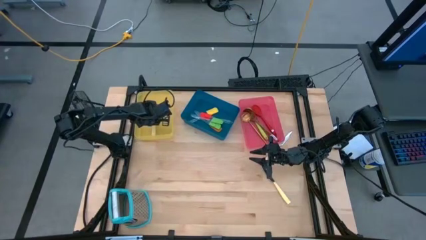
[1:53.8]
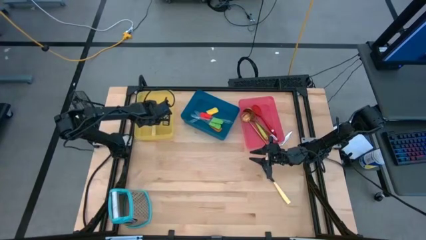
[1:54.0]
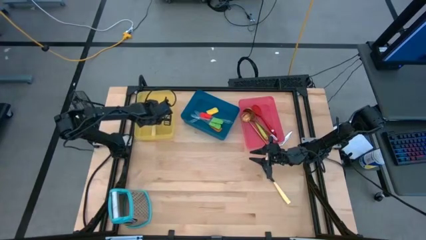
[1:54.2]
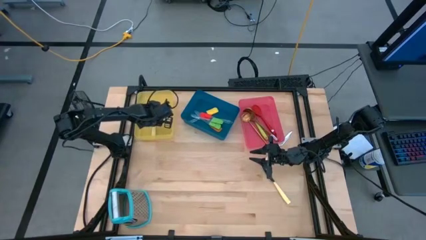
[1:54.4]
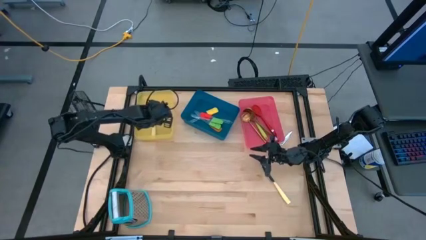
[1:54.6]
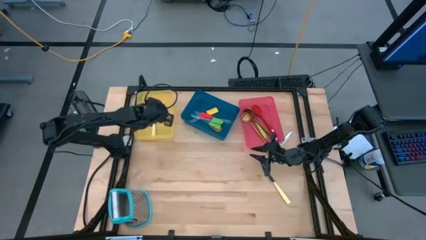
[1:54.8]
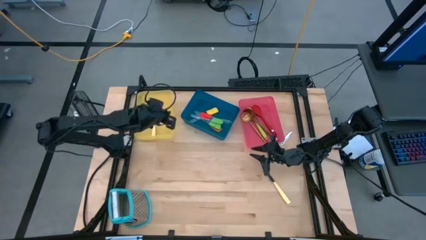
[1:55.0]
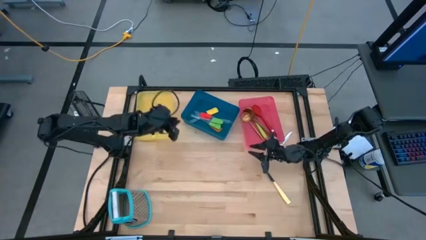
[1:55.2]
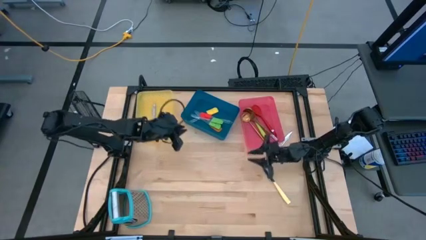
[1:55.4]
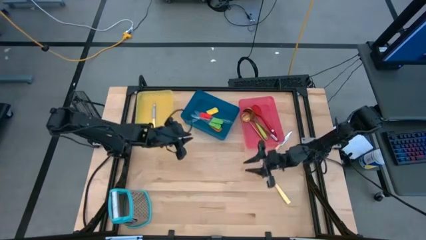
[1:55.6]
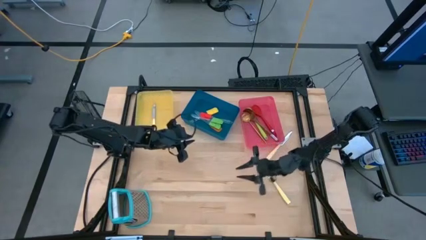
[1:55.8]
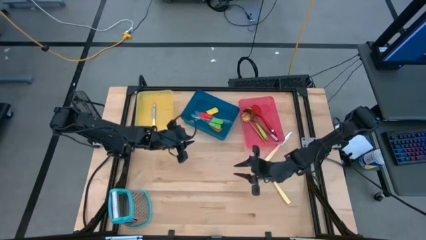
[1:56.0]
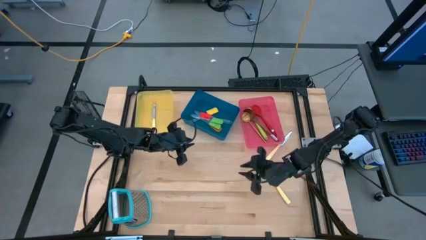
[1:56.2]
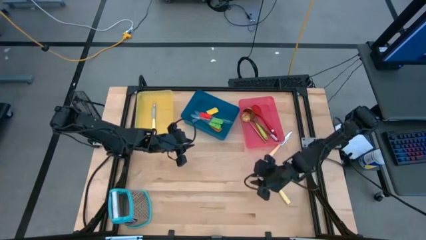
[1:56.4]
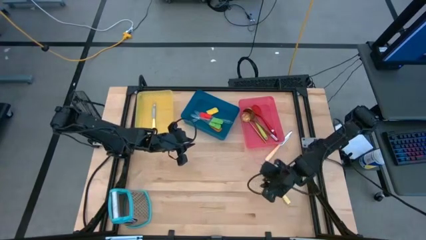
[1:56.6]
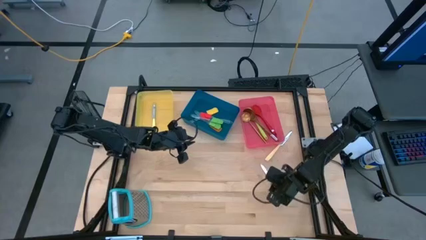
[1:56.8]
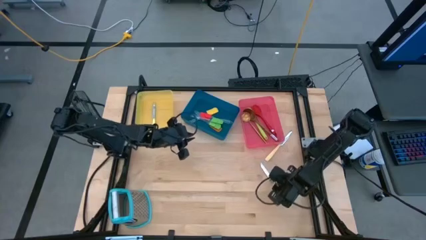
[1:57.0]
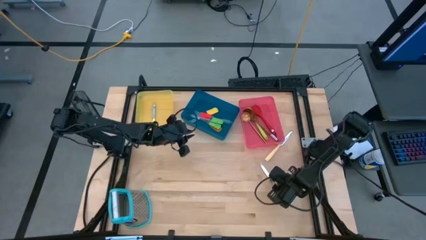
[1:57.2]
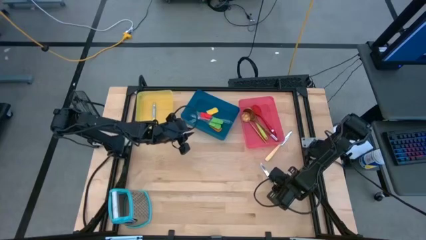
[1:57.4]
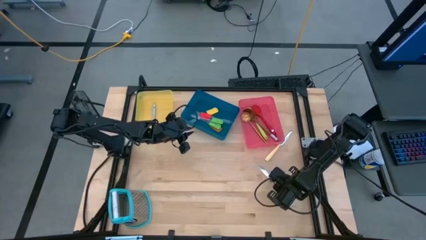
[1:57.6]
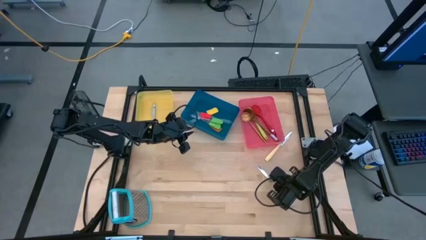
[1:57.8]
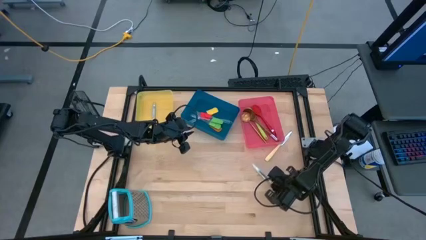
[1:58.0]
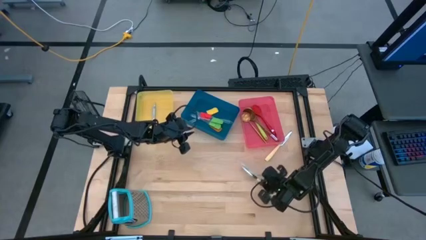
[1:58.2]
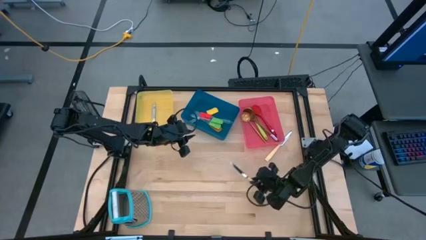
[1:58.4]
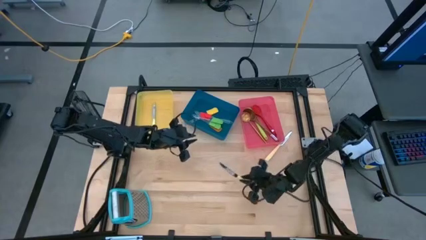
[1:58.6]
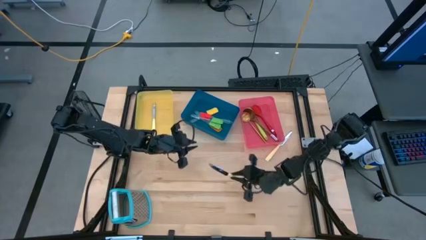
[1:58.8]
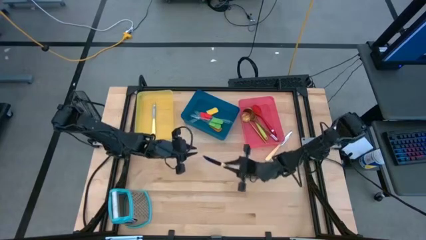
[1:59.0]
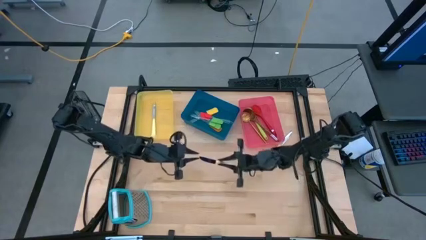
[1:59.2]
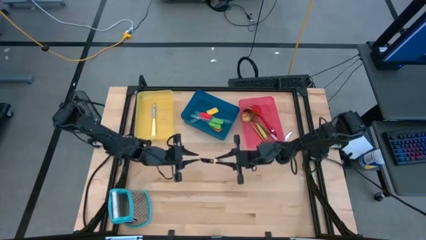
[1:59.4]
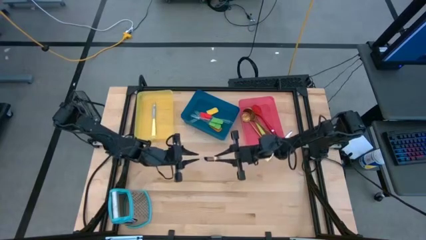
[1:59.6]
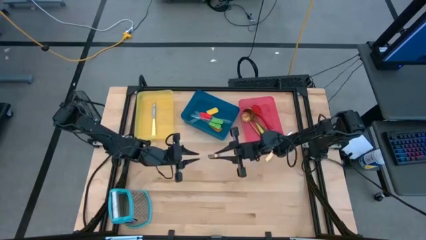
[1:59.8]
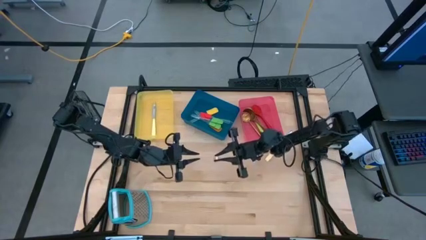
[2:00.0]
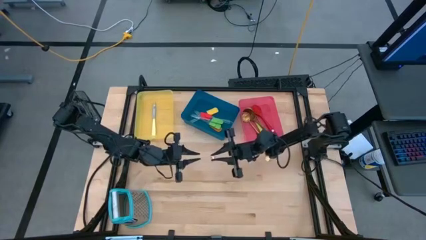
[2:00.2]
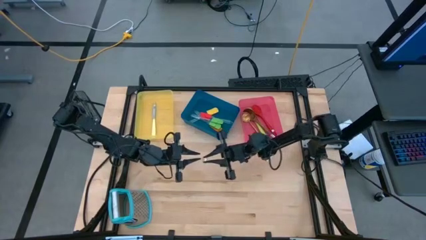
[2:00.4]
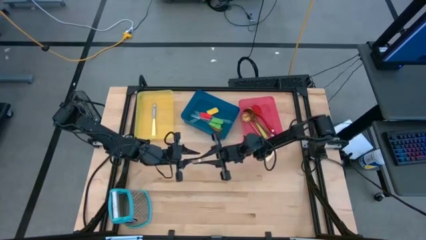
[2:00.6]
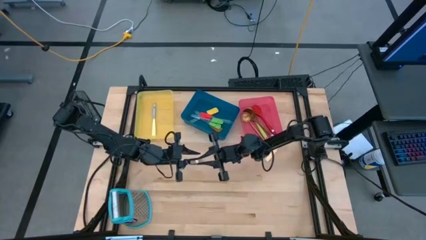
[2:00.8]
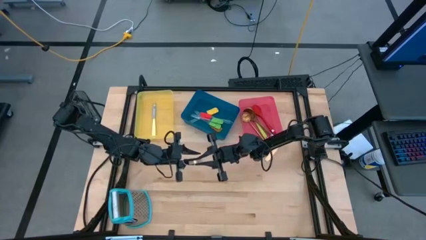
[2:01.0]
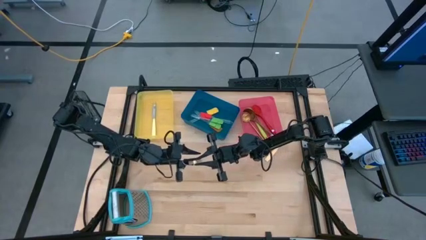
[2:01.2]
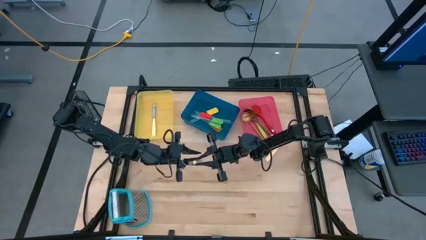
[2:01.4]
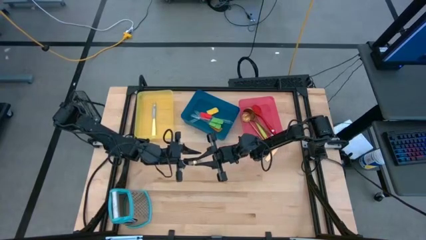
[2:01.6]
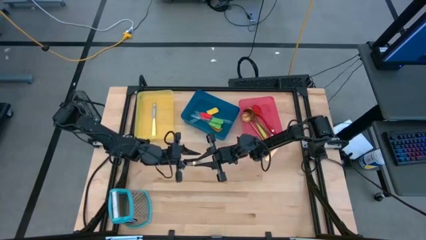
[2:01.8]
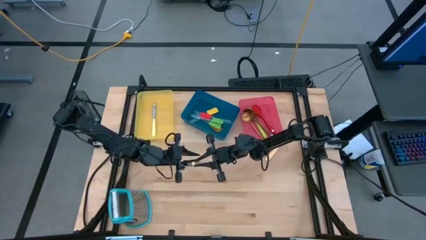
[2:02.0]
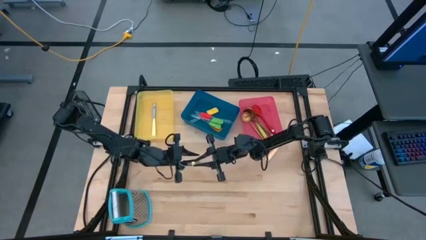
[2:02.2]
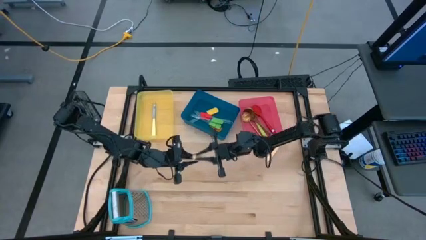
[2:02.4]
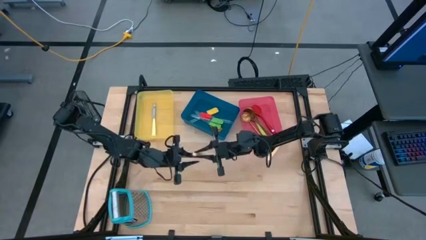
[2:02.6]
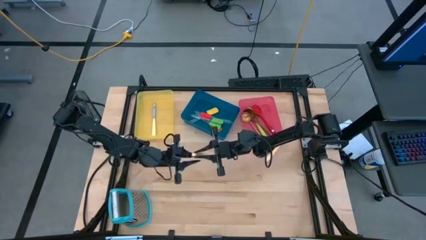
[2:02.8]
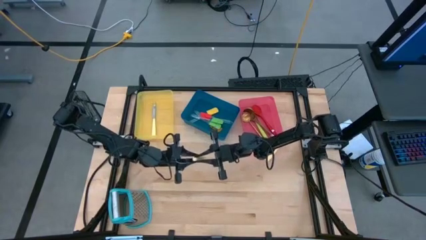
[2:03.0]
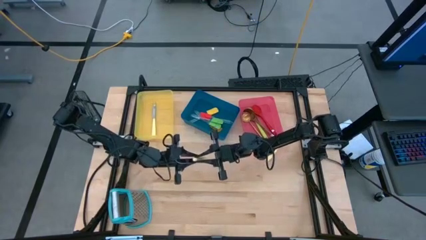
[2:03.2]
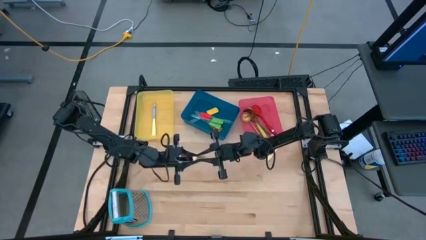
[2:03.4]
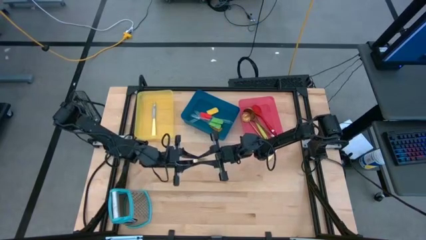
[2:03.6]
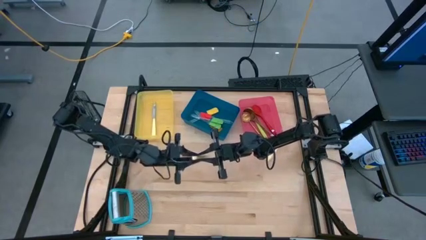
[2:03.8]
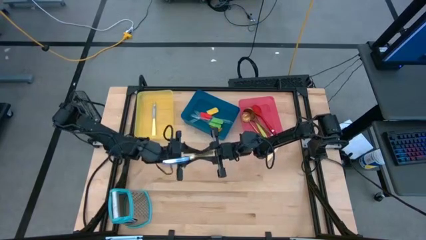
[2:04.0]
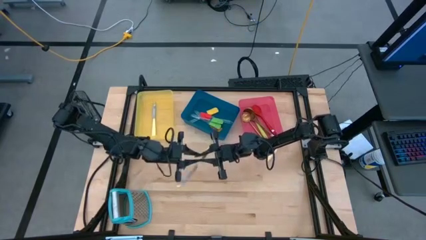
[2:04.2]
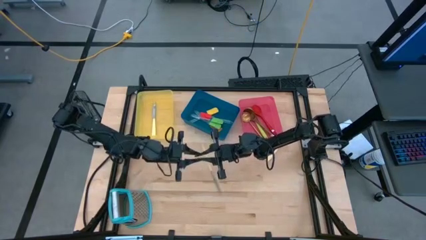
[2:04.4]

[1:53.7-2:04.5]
Task: Pick & Place Kitchen Items
Put the bottom light yellow knife into the yellow bin

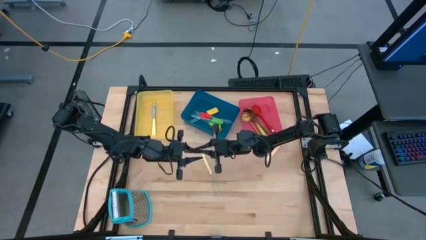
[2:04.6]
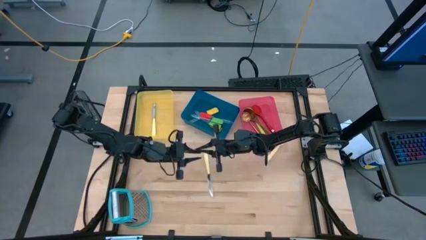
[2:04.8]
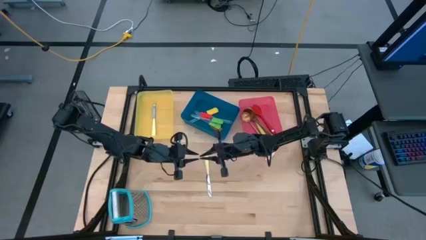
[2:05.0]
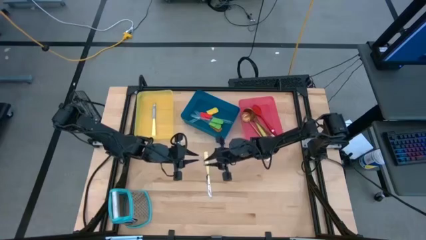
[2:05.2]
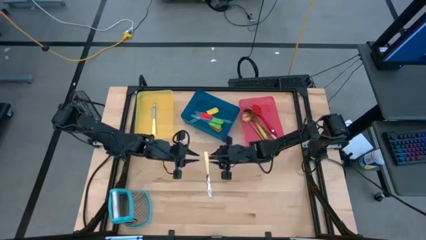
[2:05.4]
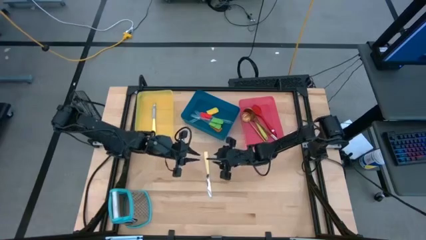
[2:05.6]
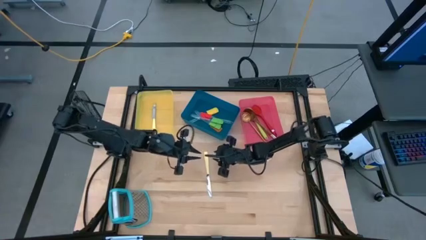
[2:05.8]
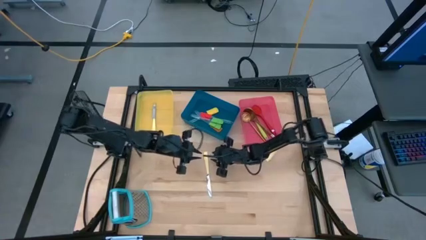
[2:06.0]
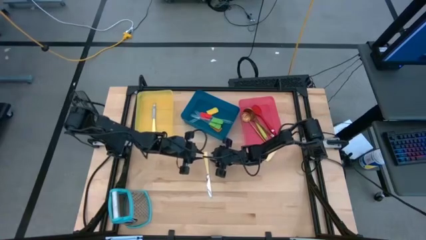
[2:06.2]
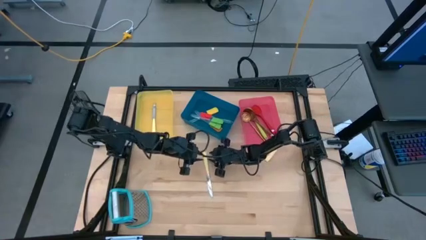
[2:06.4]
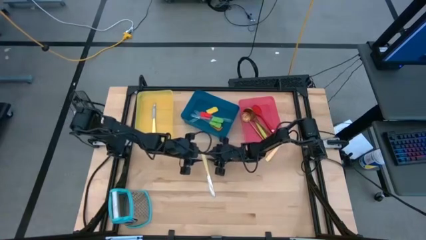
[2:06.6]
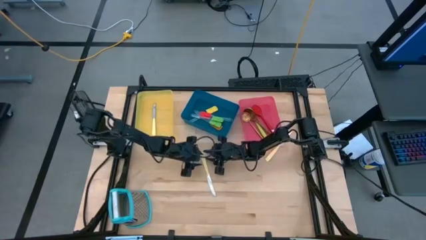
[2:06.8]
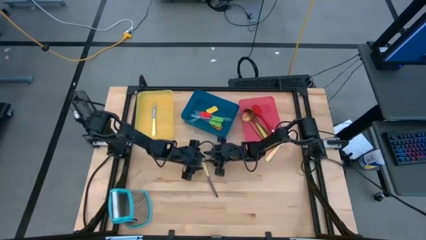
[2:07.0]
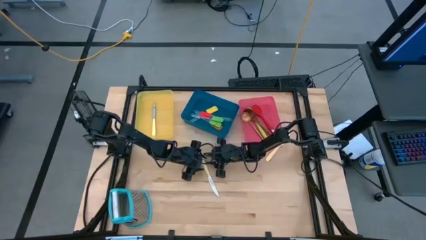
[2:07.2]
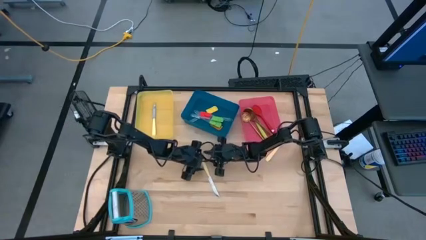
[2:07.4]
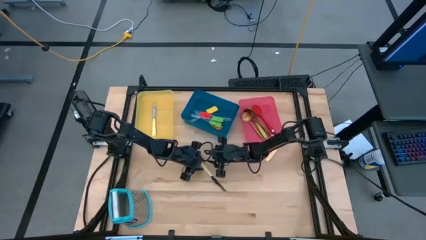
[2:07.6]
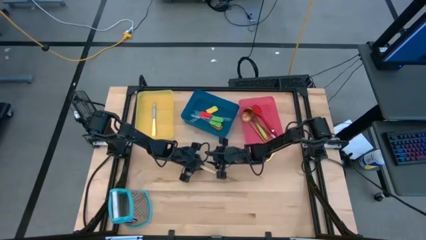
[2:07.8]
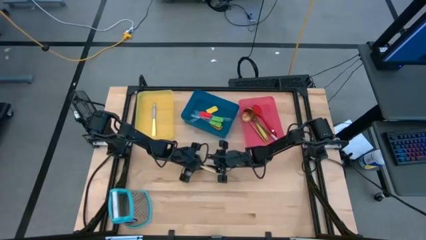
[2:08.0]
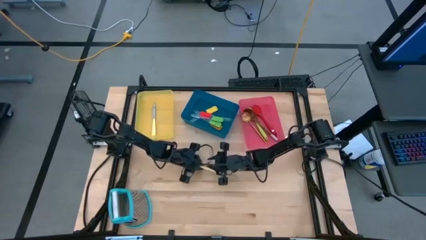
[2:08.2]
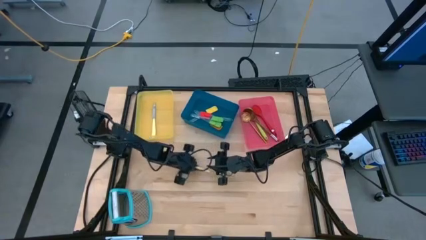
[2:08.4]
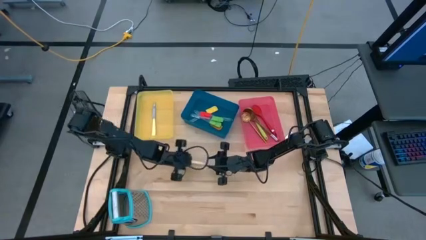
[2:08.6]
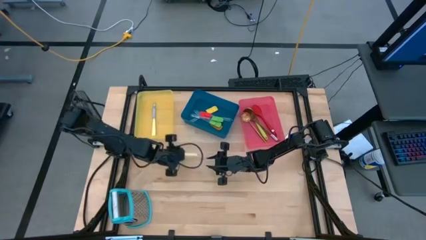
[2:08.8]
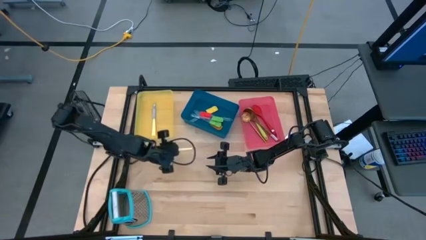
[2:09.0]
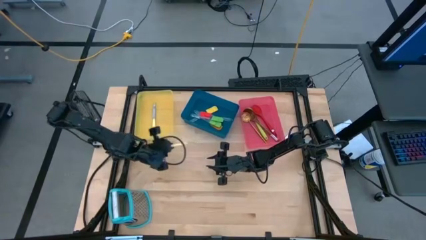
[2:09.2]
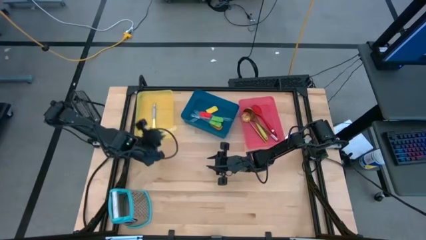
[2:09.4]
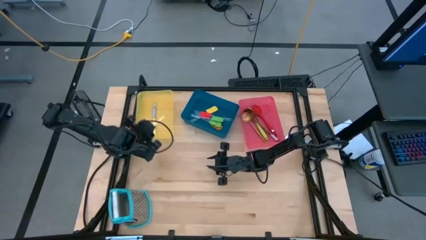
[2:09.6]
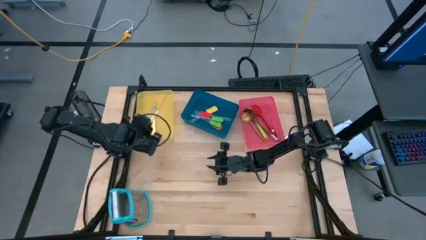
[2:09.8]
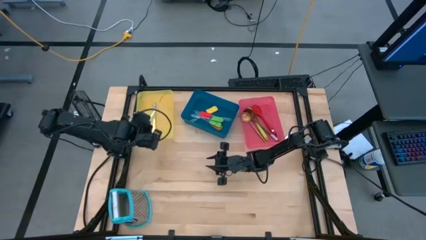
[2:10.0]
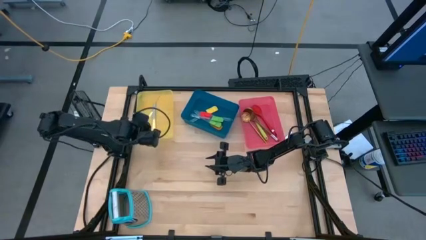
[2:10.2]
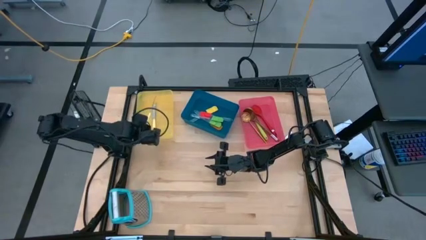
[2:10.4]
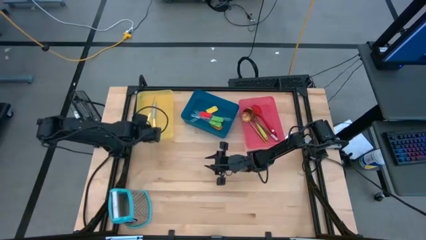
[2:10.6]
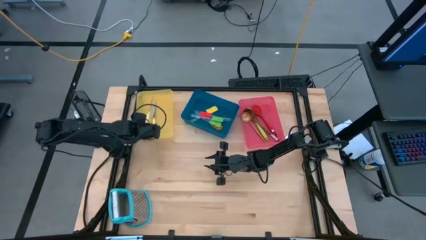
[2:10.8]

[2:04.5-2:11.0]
Put the bottom light yellow knife into the yellow bin
